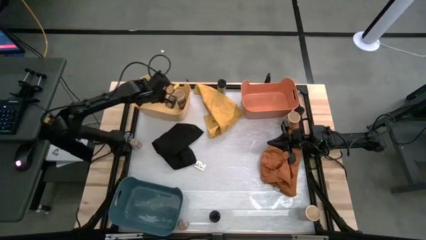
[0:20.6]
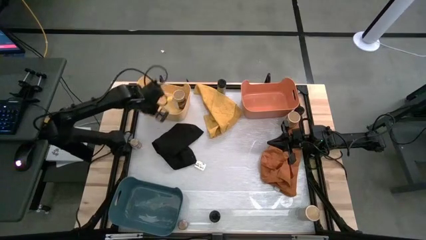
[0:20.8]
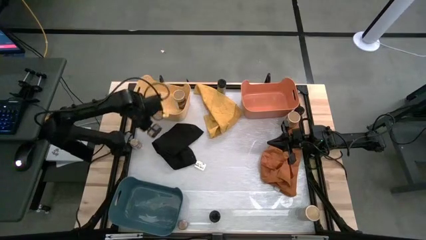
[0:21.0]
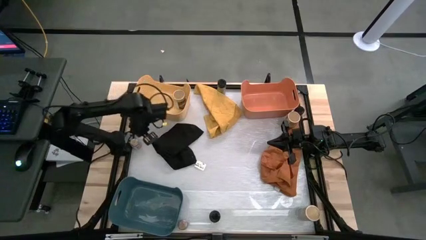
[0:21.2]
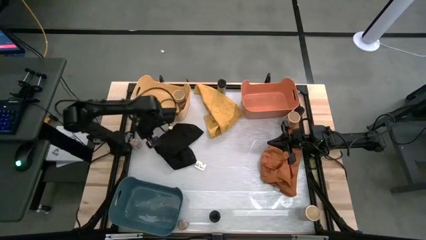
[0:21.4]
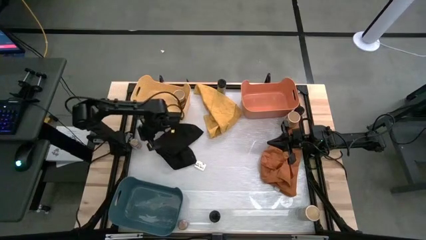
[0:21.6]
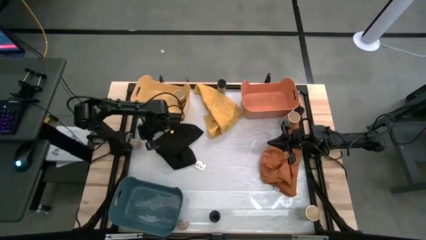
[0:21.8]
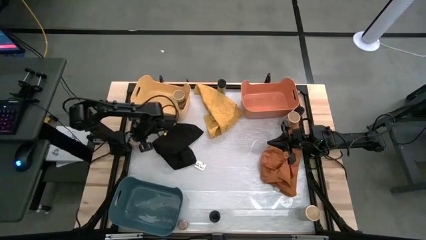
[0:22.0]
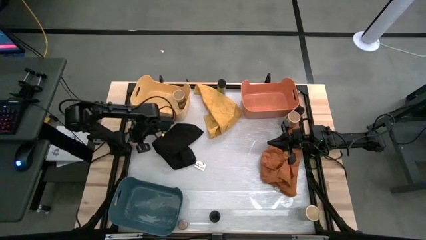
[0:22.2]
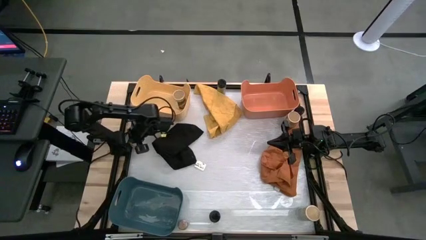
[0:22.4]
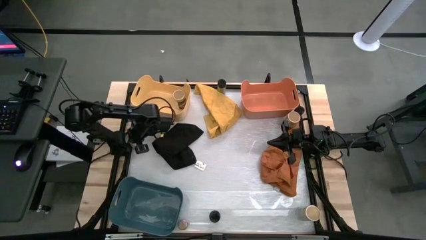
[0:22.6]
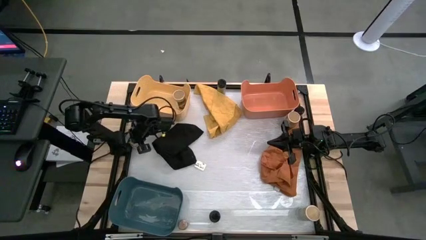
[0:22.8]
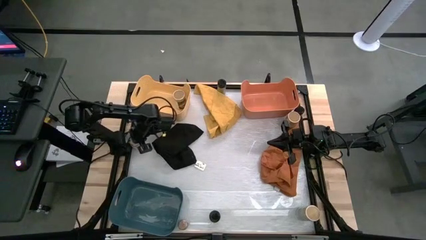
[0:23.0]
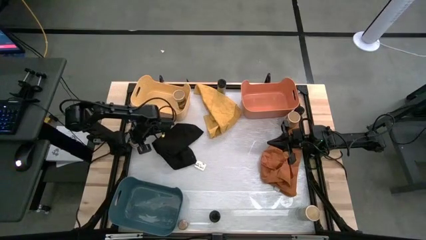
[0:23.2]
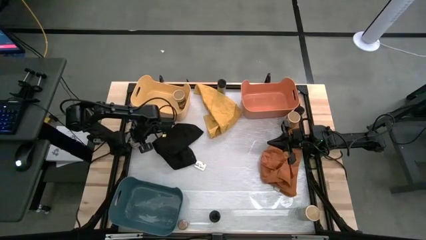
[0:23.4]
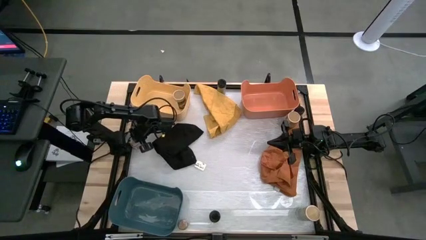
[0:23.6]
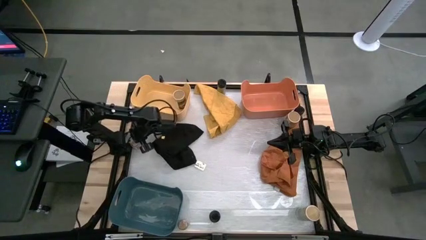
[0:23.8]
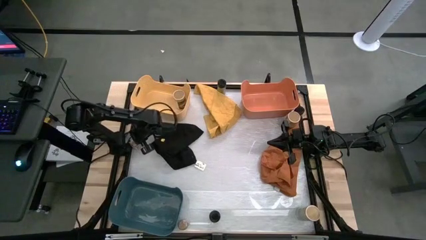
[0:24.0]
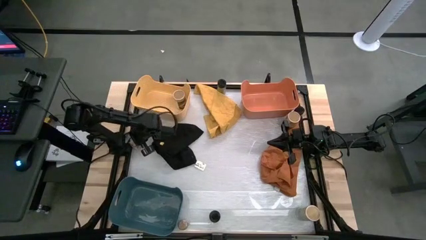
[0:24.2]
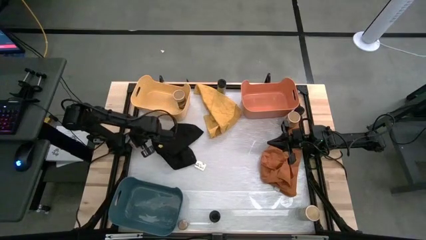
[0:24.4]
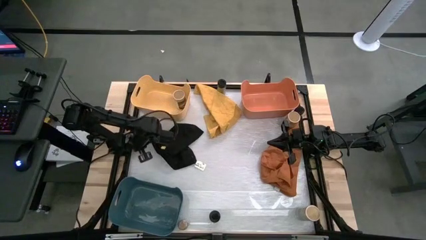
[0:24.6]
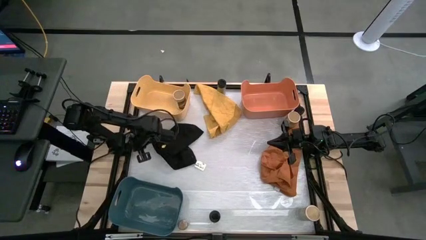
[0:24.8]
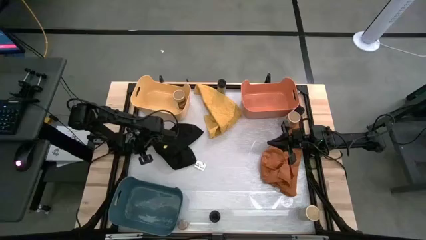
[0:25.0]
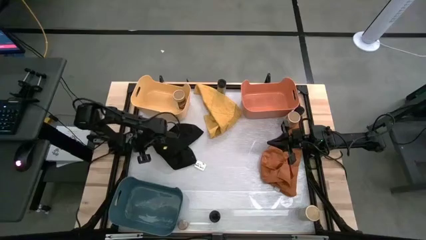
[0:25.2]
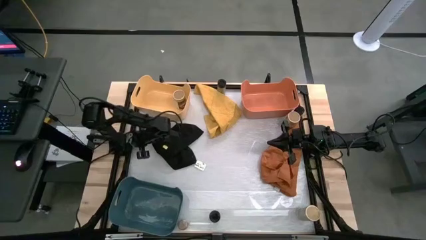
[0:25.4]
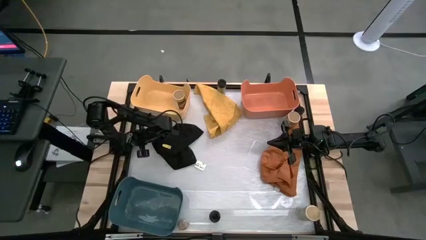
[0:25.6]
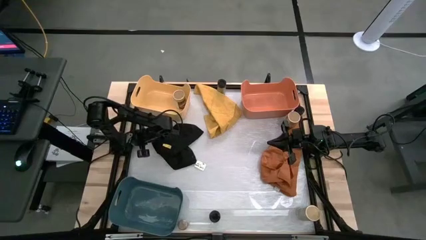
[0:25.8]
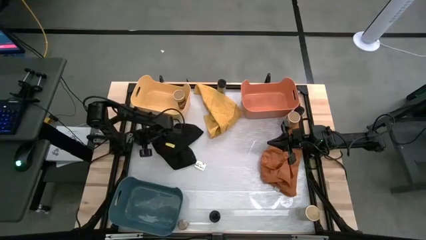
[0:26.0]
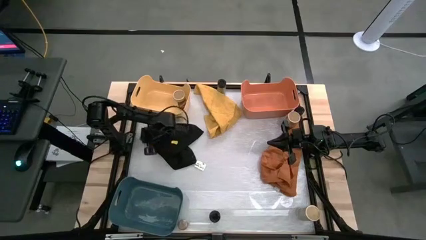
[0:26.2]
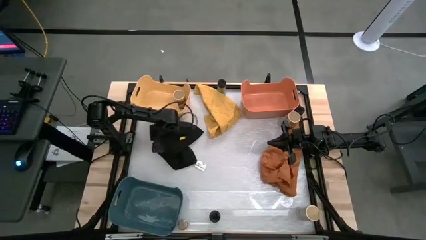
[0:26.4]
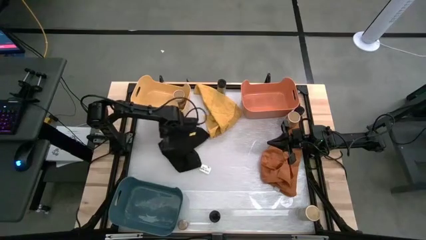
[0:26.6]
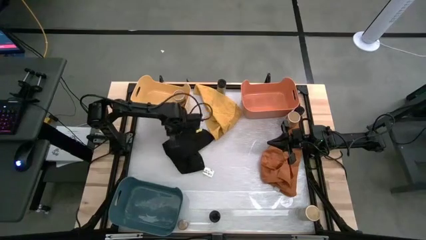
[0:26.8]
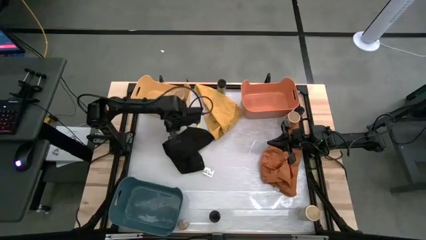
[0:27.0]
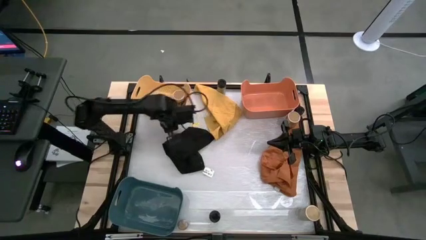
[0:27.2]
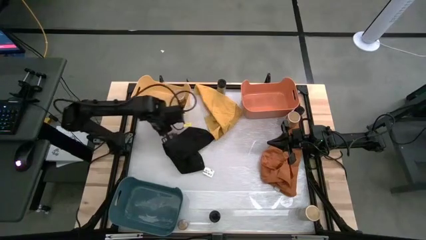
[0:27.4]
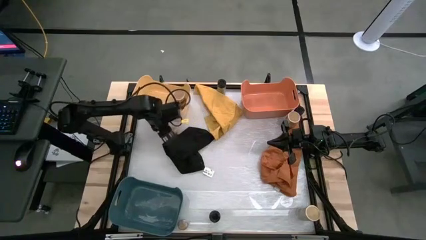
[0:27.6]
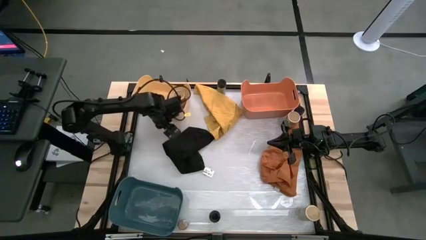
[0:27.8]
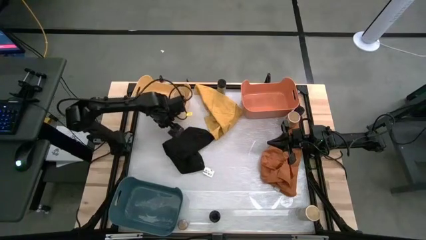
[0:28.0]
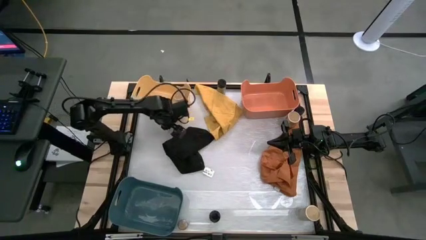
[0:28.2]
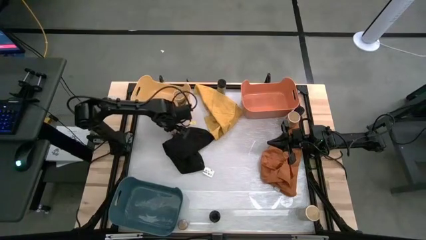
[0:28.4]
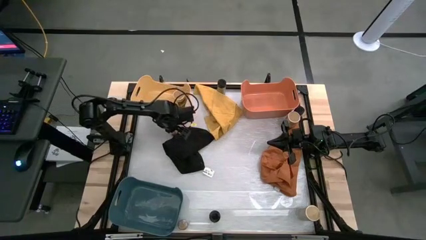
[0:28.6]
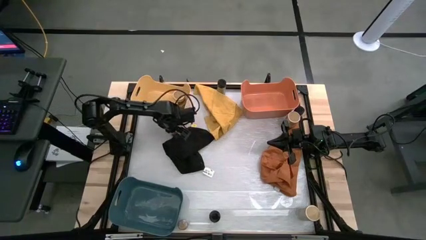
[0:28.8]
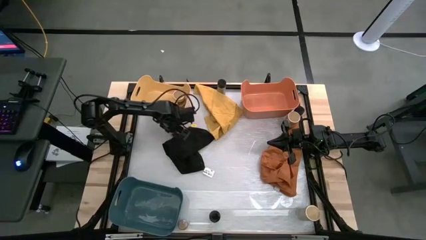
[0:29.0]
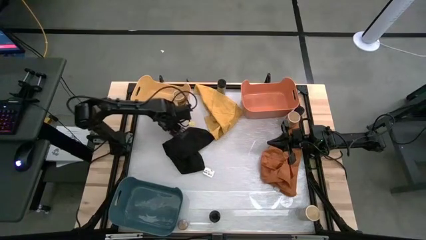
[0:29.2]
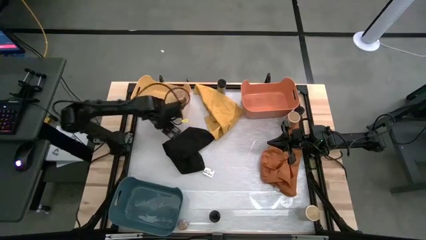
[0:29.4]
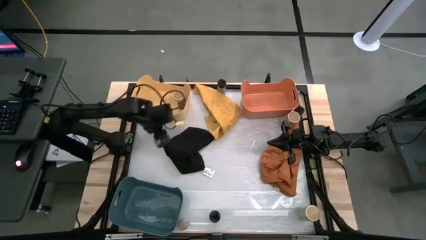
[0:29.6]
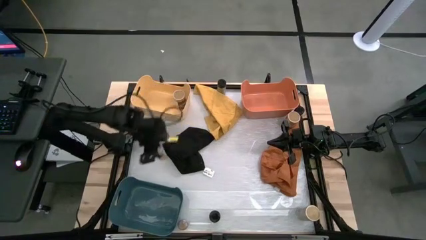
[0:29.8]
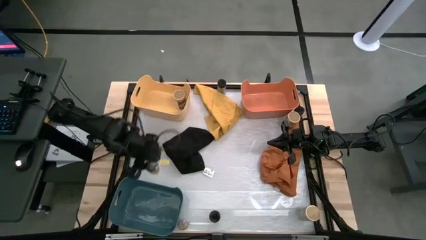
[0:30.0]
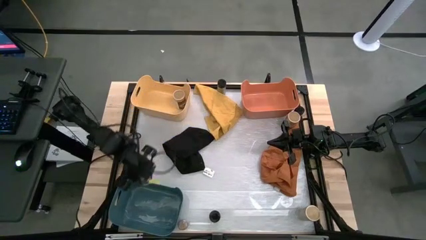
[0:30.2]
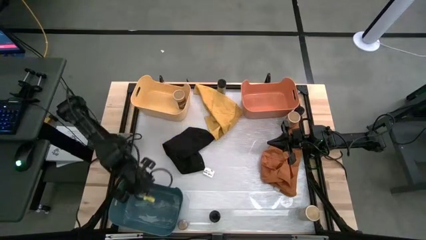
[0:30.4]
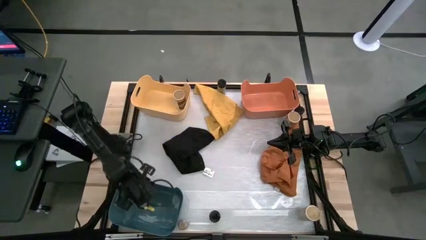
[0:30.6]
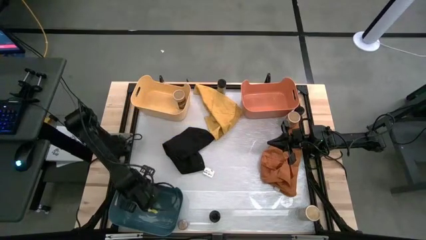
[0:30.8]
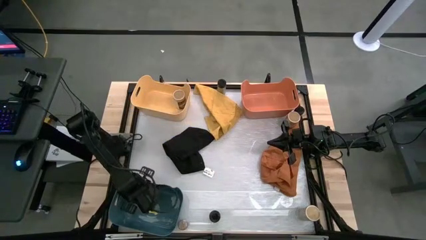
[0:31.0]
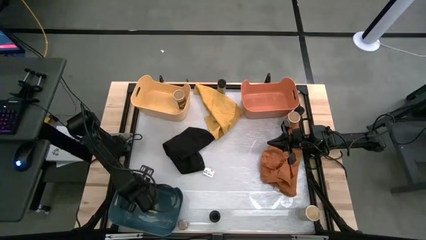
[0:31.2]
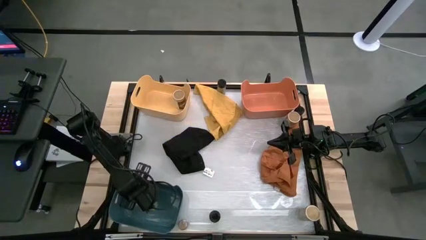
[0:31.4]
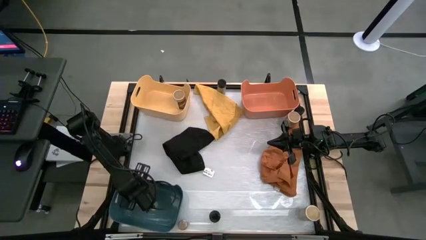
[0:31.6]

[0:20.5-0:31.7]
Task: Sort spices by type
Put the top brown seasoning bottle into the blue bin
